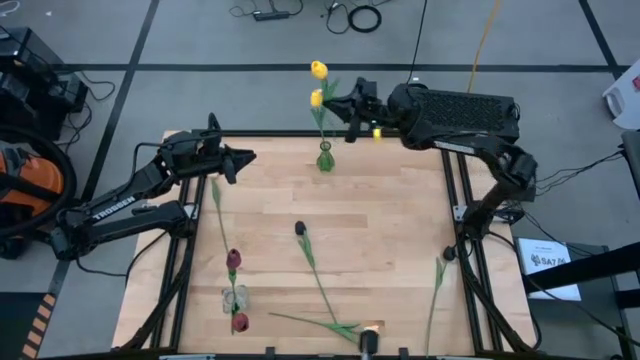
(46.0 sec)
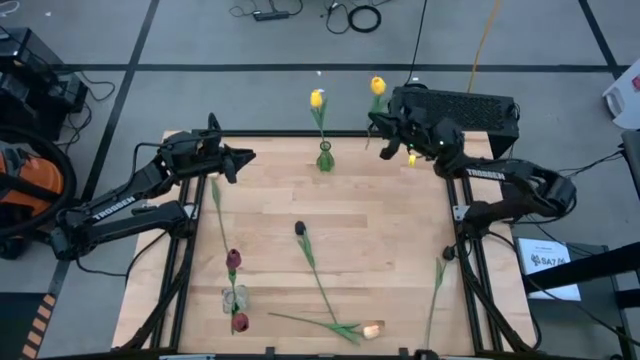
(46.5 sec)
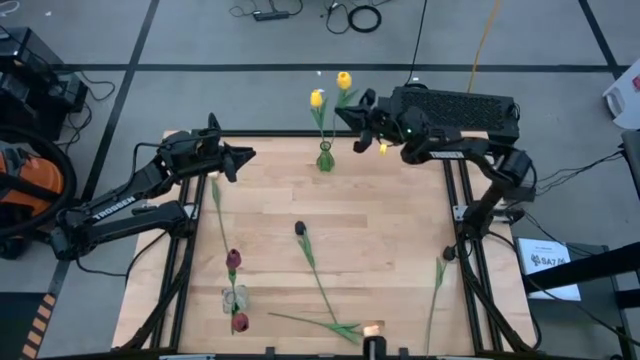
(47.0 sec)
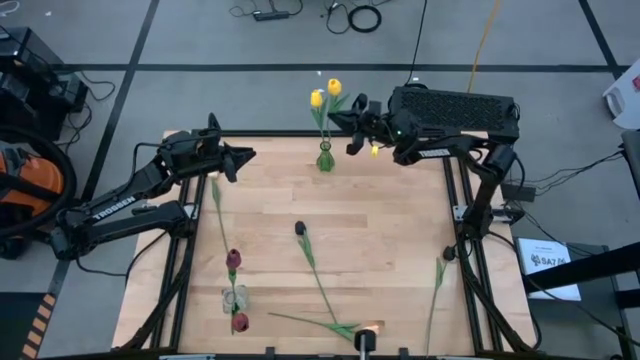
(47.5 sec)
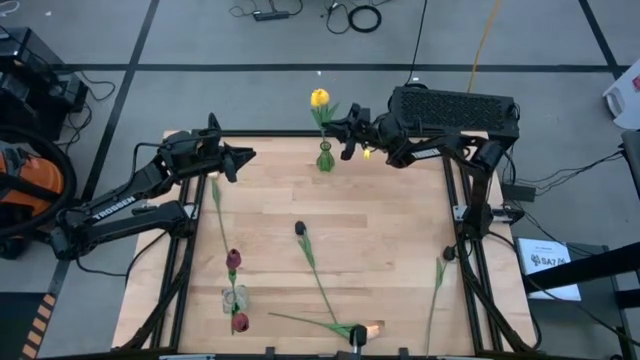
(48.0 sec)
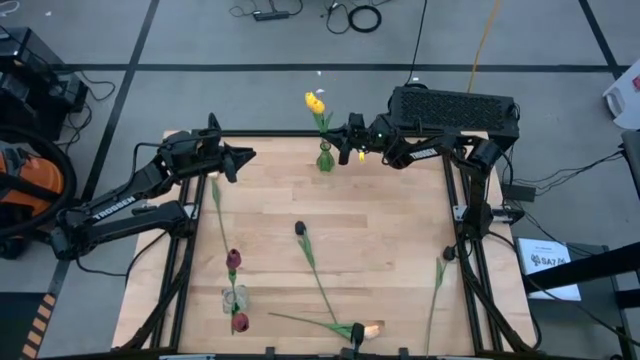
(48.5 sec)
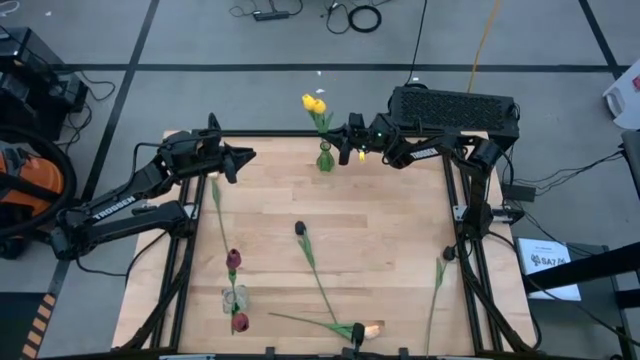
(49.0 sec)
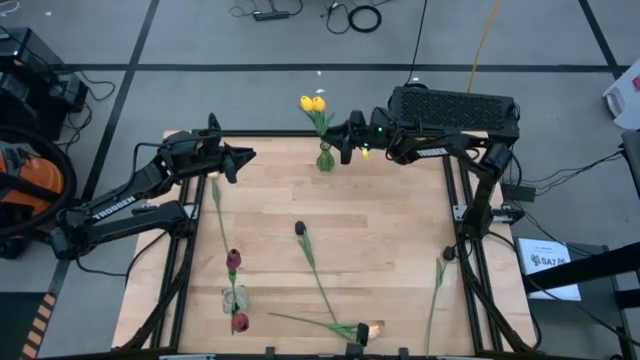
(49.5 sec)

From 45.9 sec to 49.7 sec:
Task: Sort flowers into vase by color
Put the yellow flower into the green vase

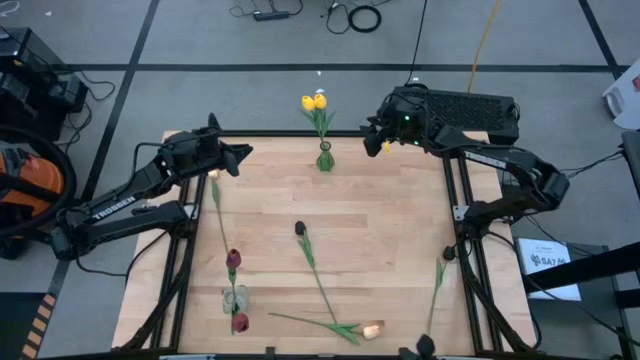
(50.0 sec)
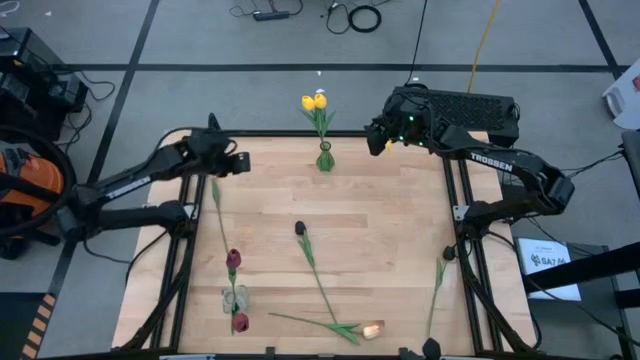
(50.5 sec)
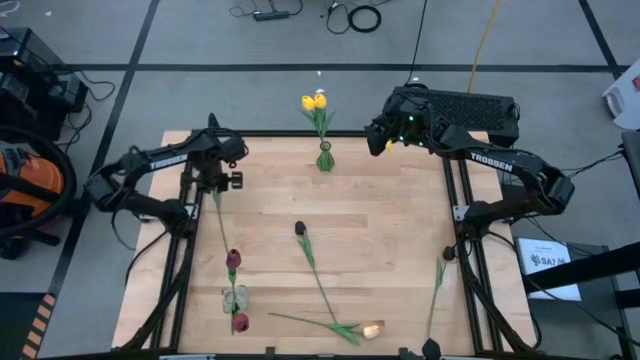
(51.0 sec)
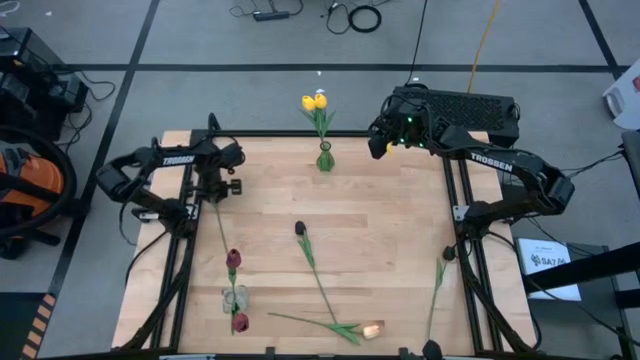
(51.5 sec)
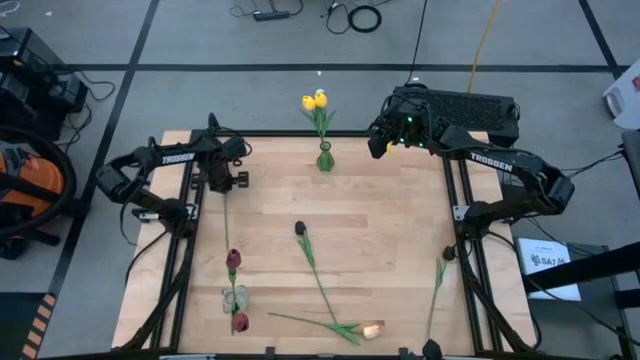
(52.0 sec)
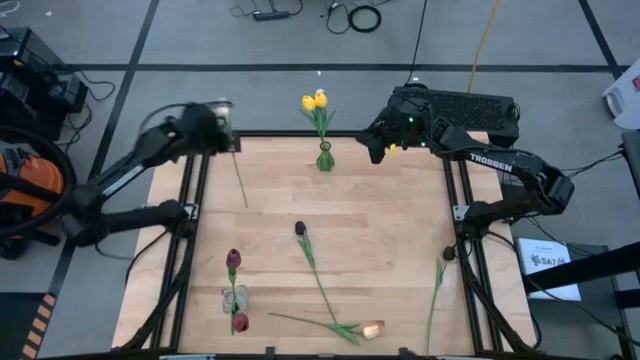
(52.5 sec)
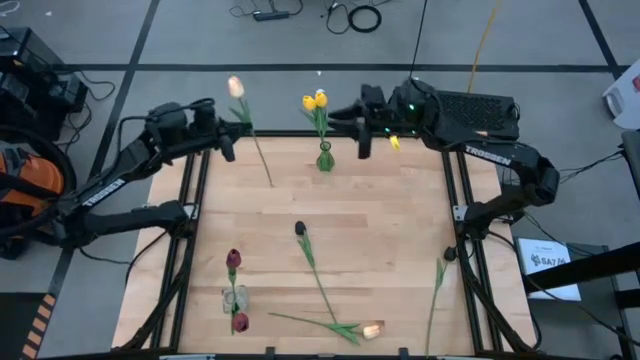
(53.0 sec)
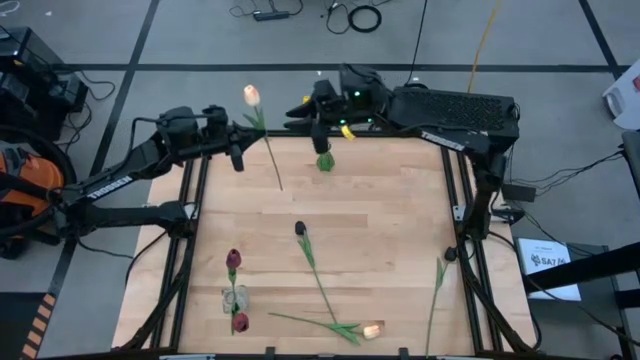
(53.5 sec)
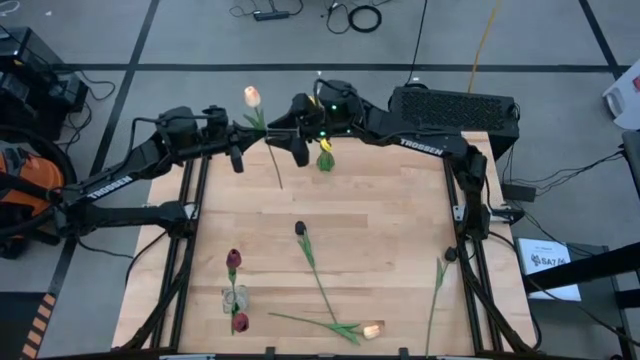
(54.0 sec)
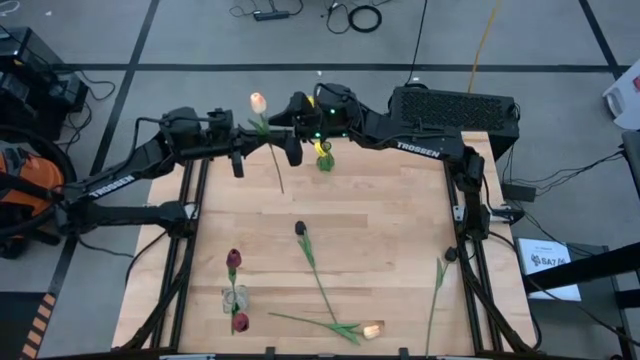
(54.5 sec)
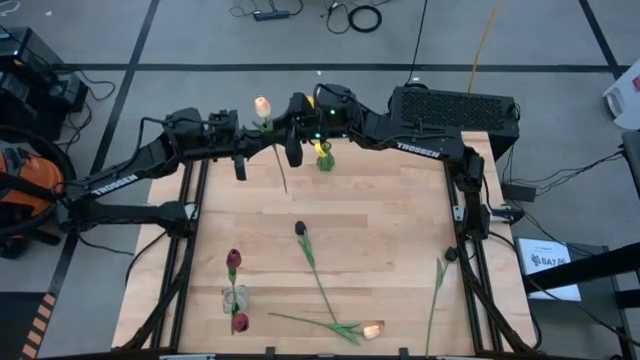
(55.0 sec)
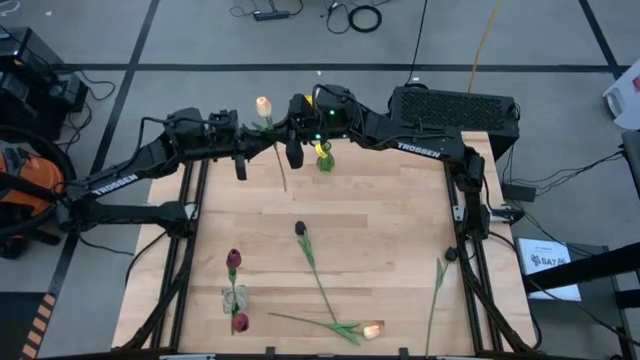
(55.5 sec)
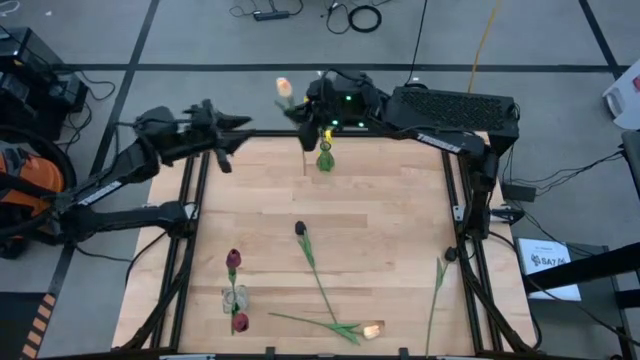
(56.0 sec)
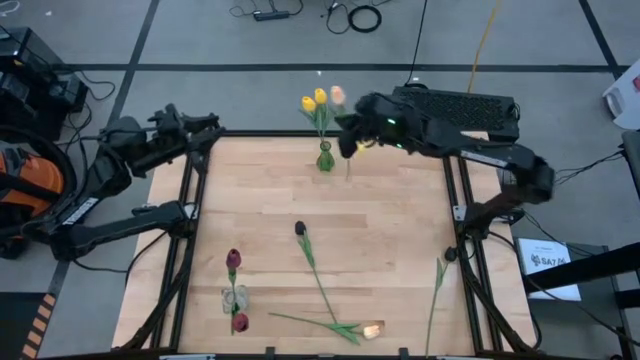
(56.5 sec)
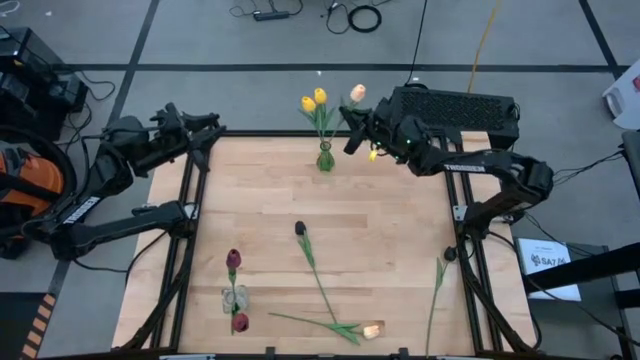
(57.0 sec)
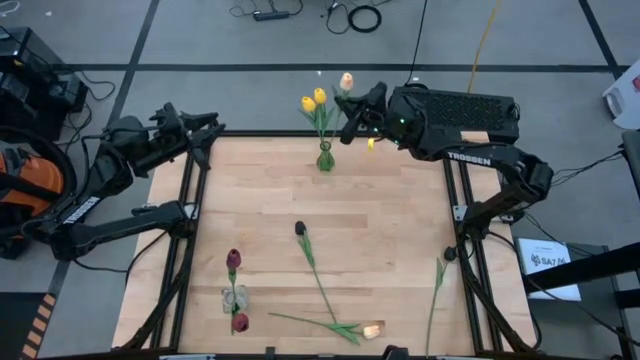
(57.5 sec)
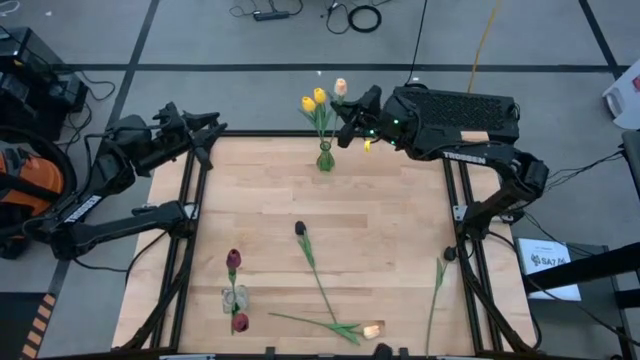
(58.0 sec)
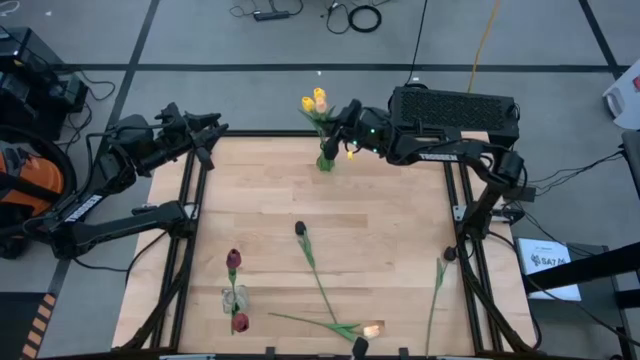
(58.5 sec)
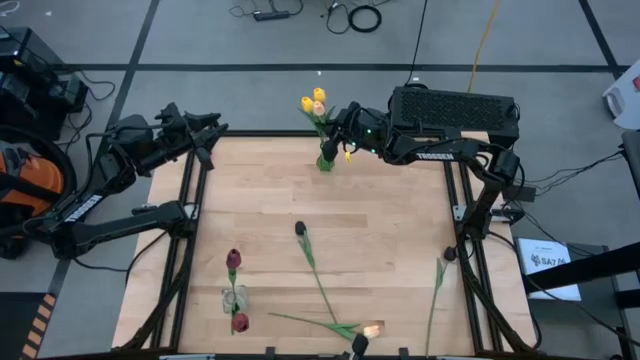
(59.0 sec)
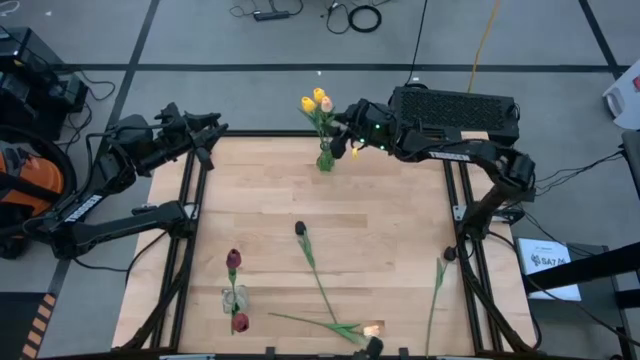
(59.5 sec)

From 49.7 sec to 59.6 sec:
Put the top light yellow flower into the green vase

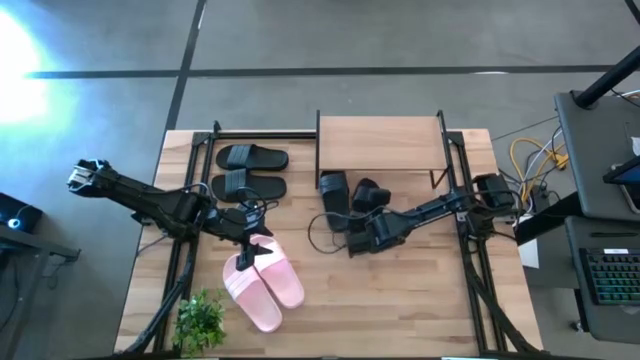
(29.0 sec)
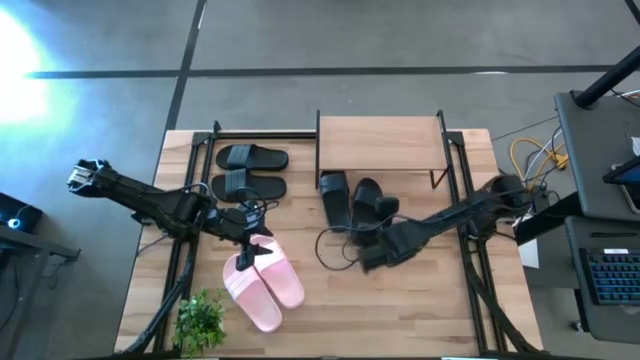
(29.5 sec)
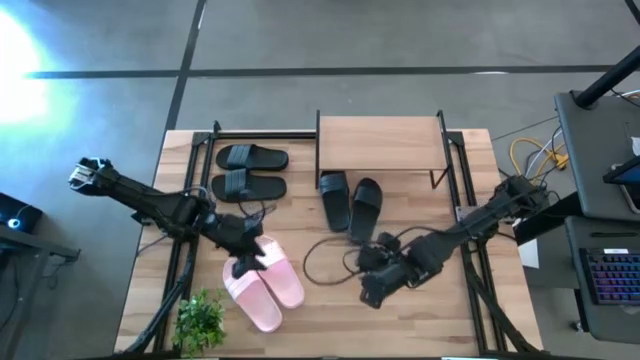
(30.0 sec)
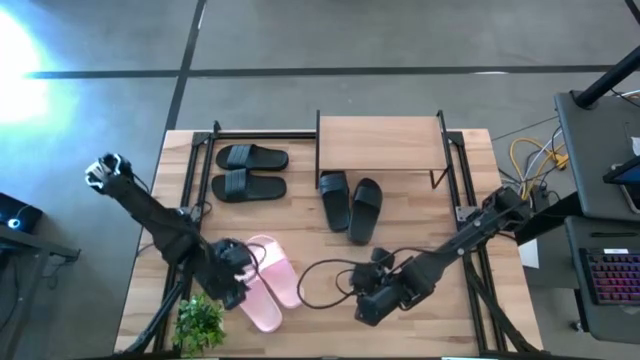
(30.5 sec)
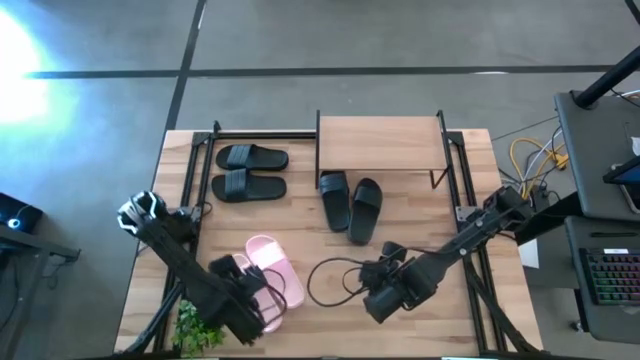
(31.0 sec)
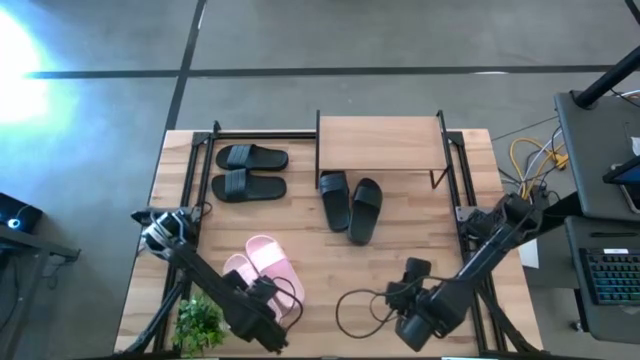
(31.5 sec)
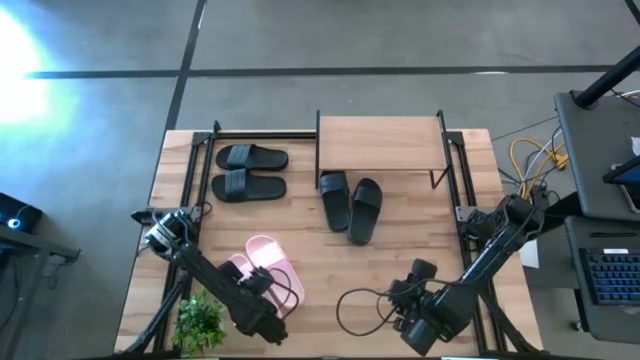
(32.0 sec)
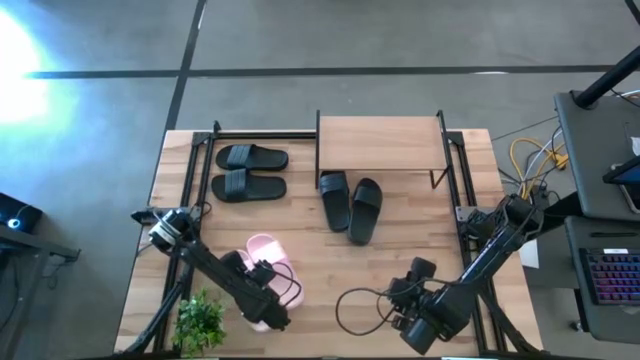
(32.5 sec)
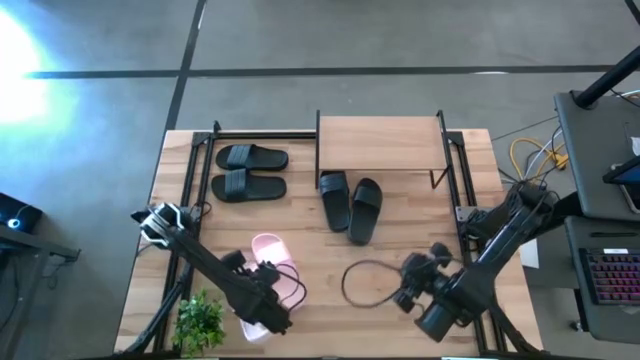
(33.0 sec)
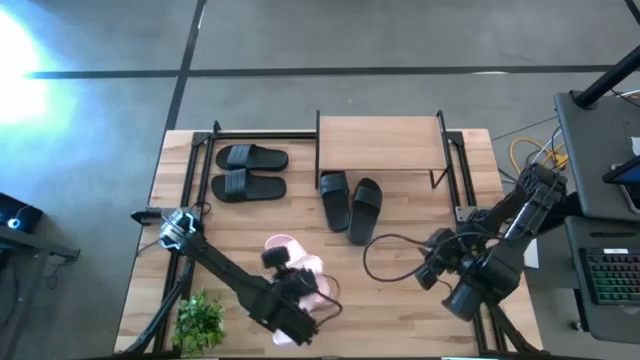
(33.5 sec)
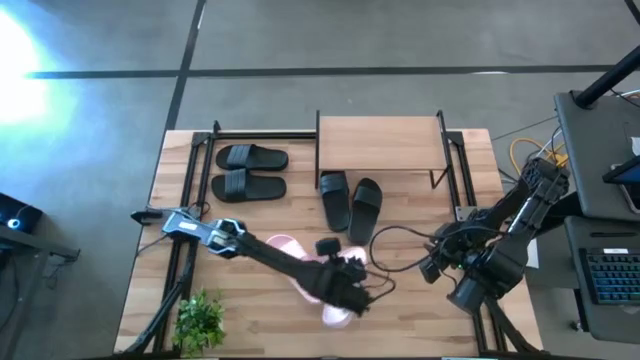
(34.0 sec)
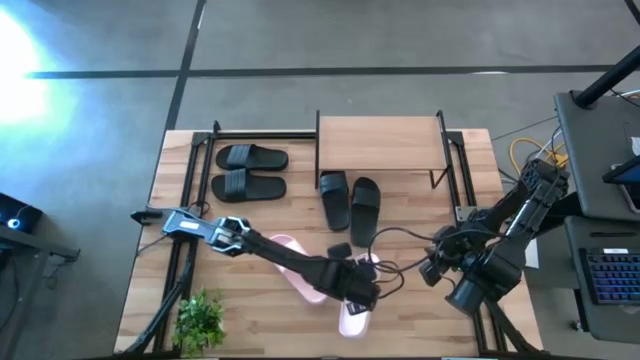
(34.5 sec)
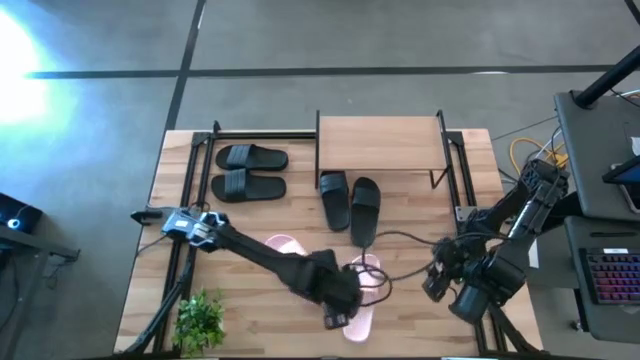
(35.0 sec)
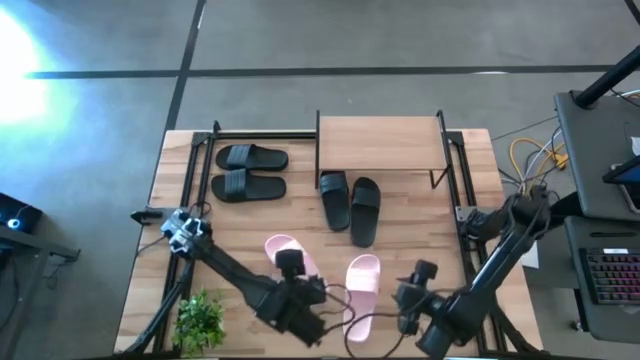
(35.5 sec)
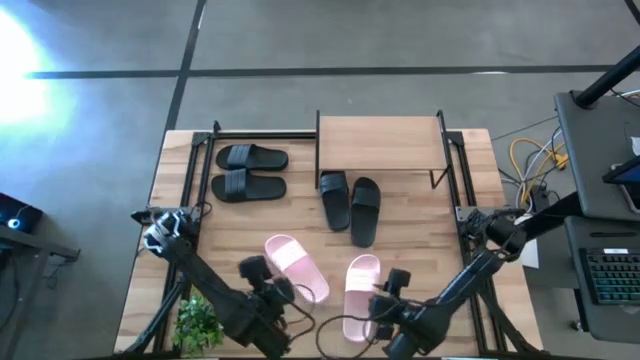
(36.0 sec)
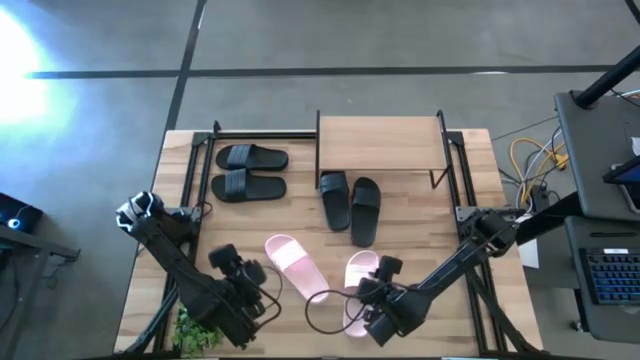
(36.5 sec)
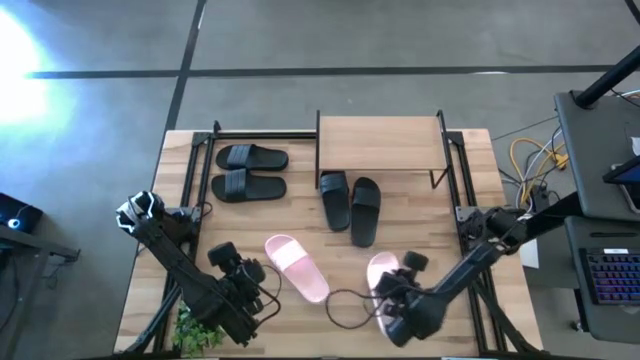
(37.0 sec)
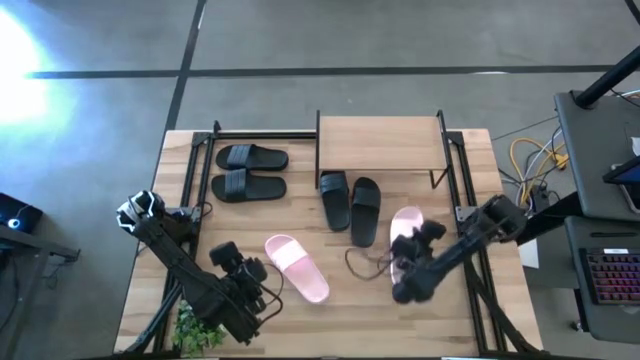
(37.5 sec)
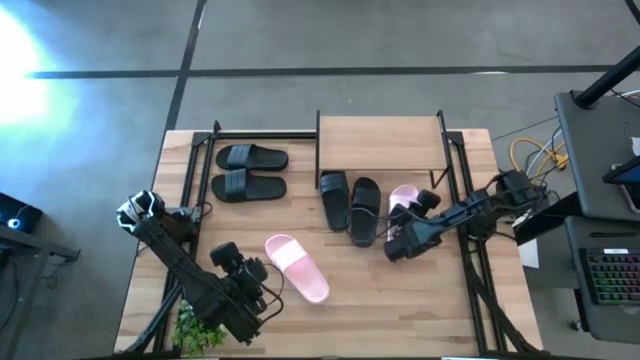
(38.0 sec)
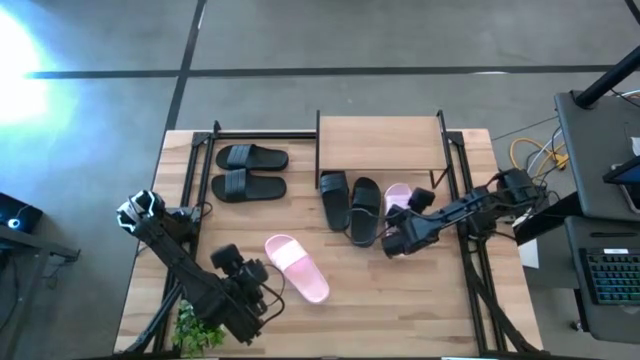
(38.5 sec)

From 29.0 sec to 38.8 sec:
Task: Pick and place slides into the shelf
Put the pink slide under the shelf
